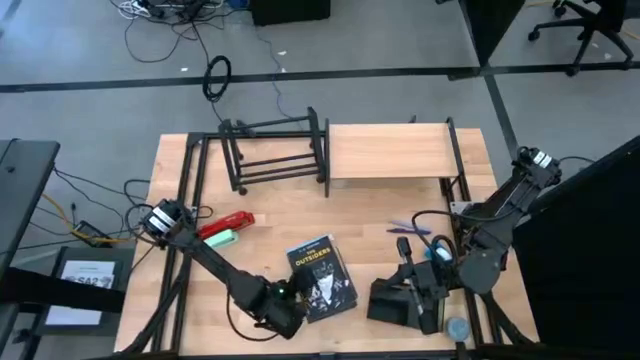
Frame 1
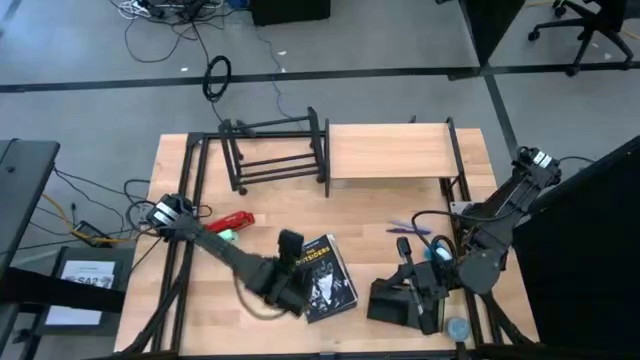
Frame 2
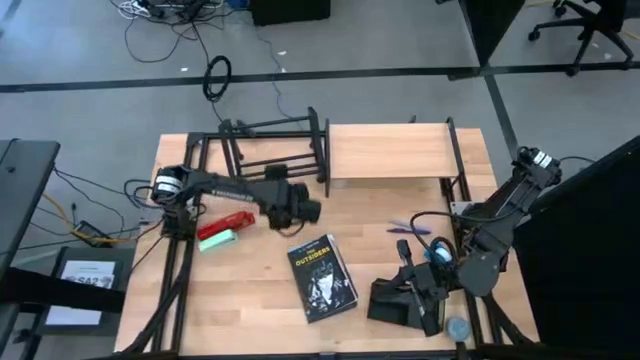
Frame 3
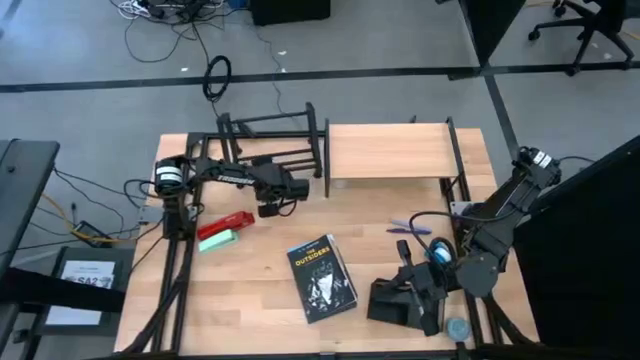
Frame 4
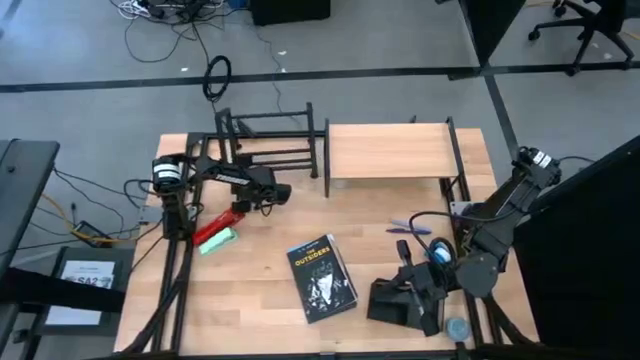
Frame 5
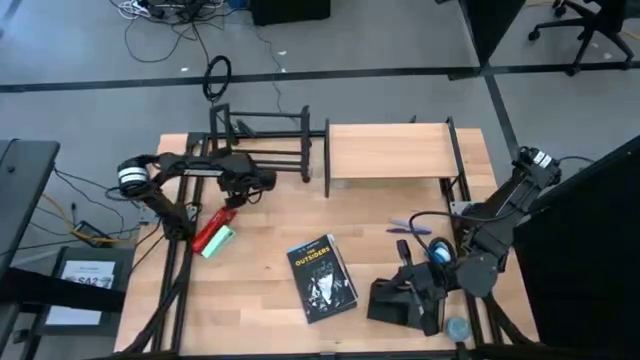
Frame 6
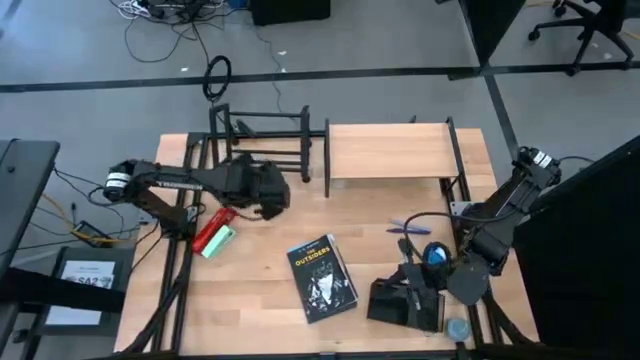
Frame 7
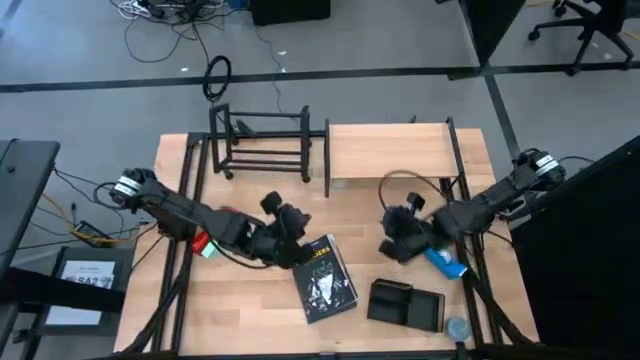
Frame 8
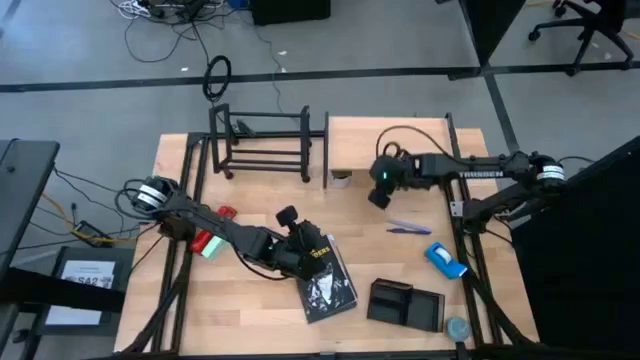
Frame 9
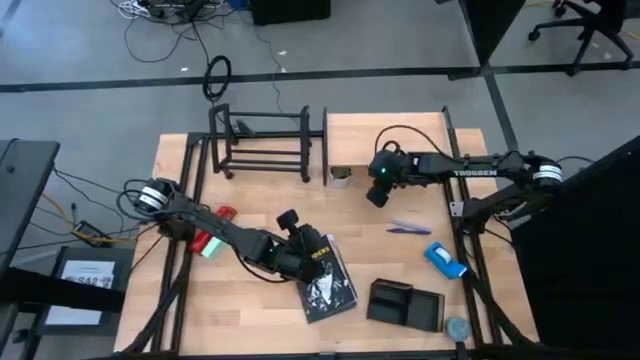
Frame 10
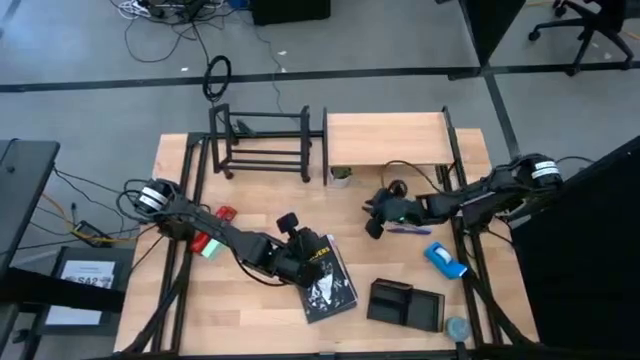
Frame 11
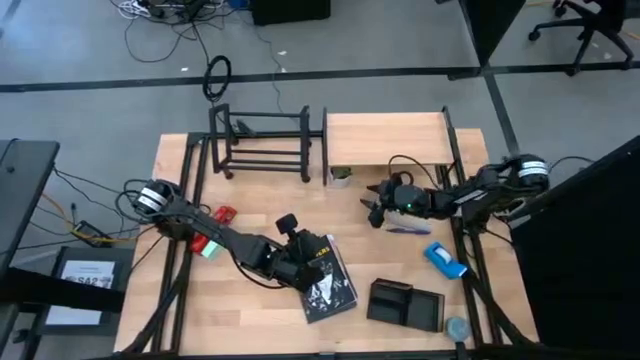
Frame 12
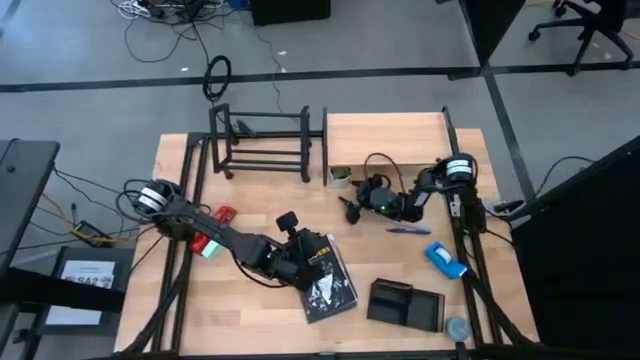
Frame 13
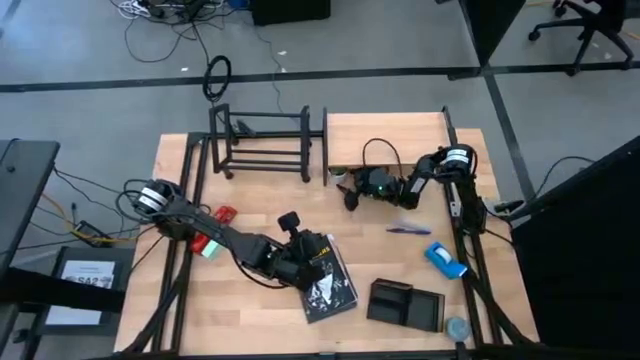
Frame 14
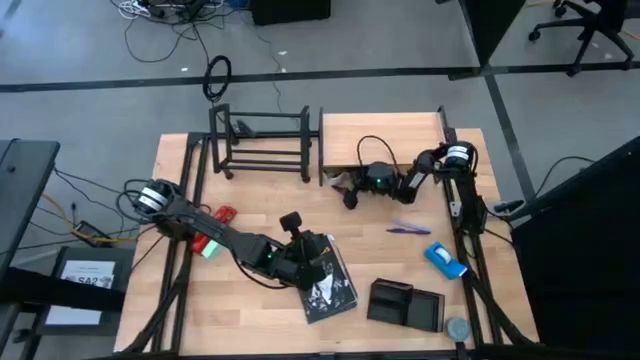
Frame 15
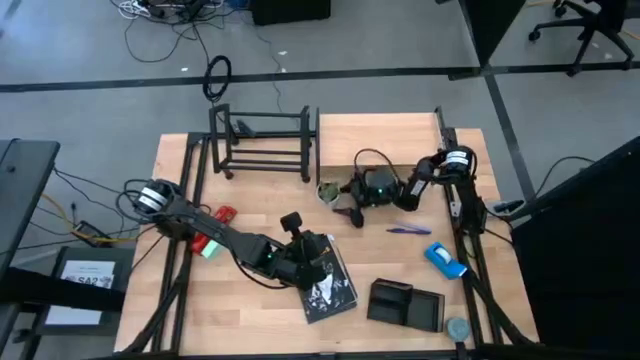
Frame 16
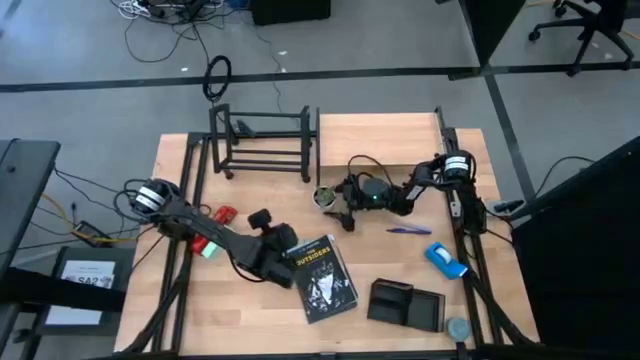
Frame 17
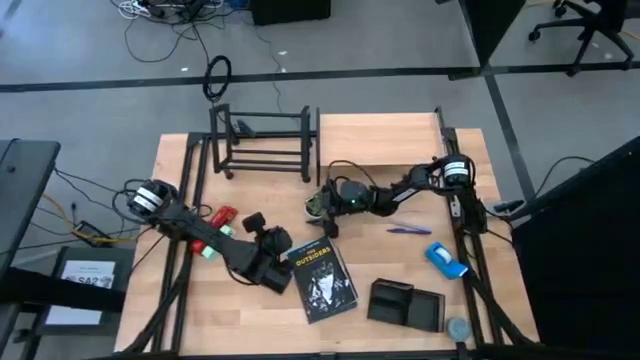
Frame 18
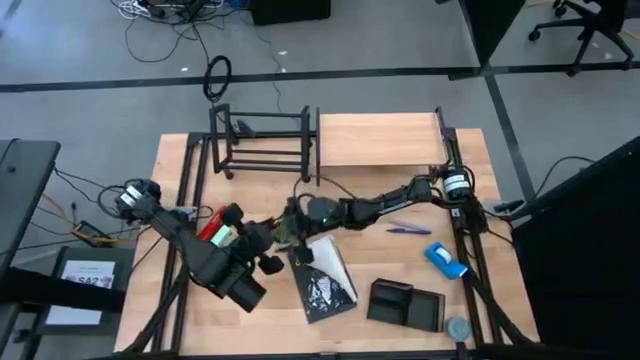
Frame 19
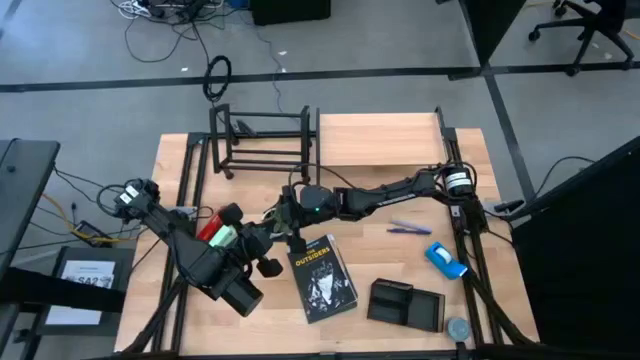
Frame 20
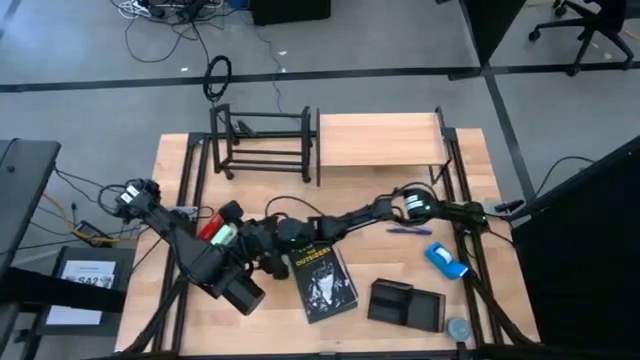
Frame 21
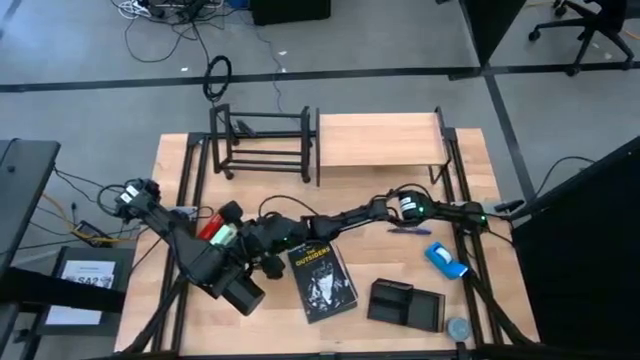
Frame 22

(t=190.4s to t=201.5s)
Task: Stock shelves
Remove the white flower pot from under the shelf

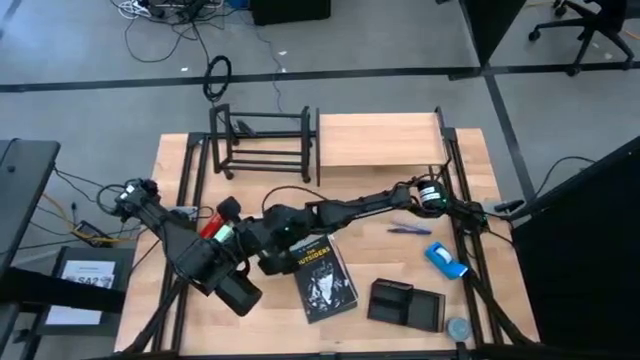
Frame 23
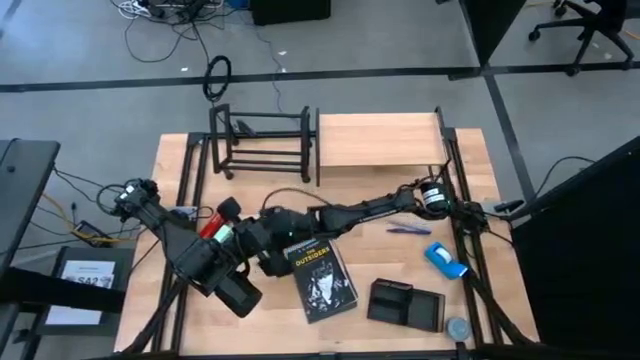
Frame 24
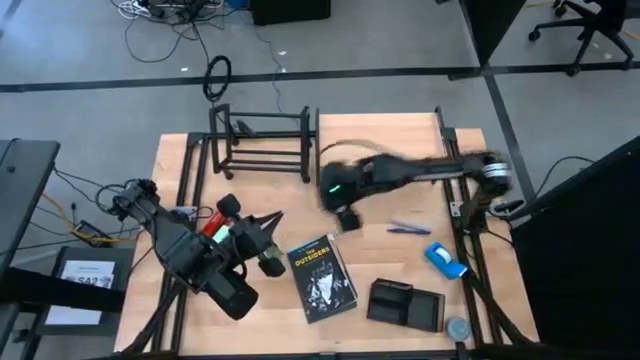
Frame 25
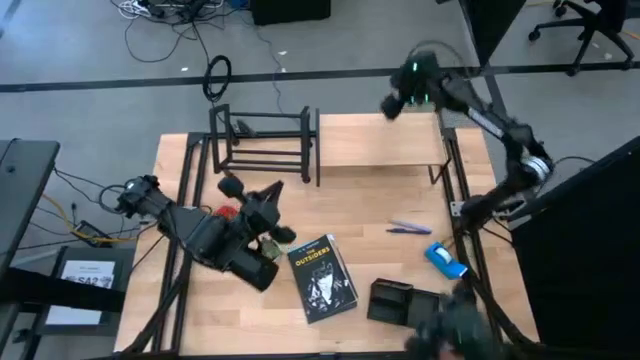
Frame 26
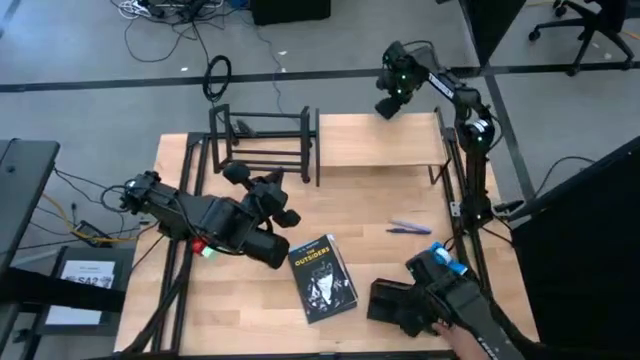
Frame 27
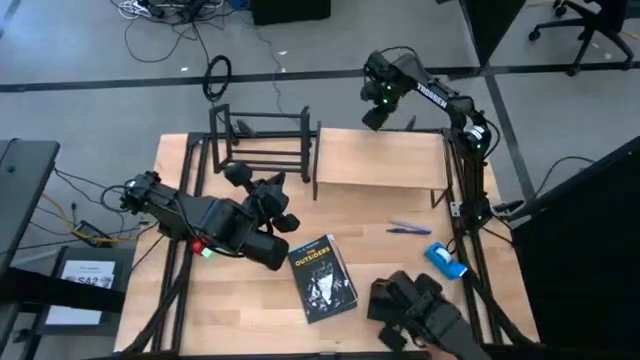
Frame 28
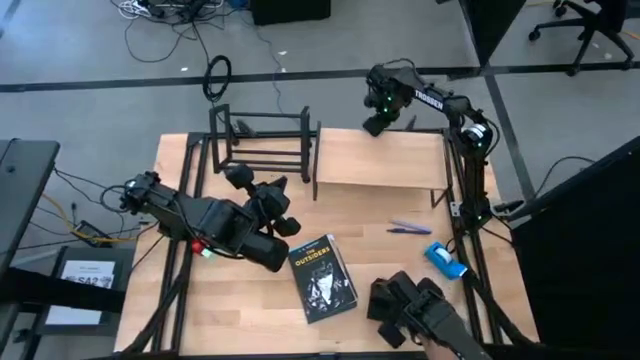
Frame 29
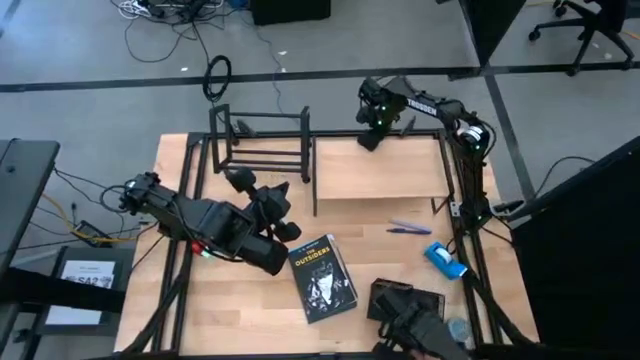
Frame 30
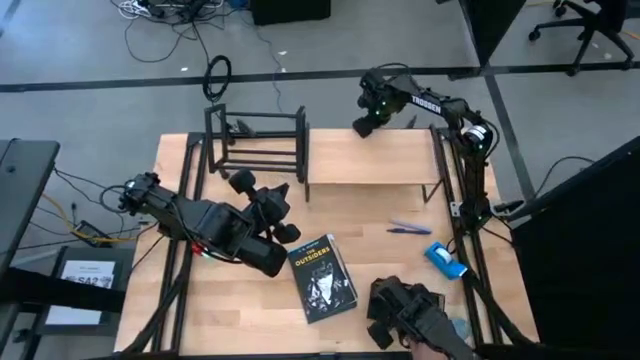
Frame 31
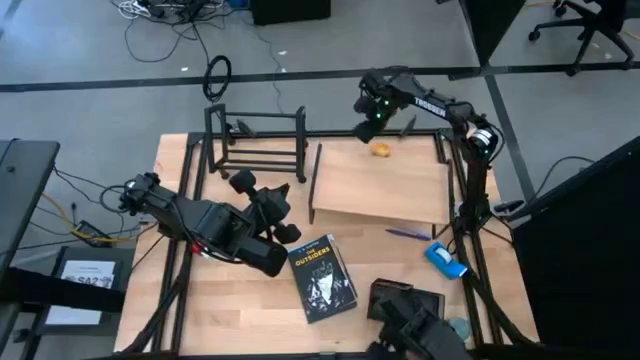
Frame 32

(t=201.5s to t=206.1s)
Move the shelf to the middle right of the table

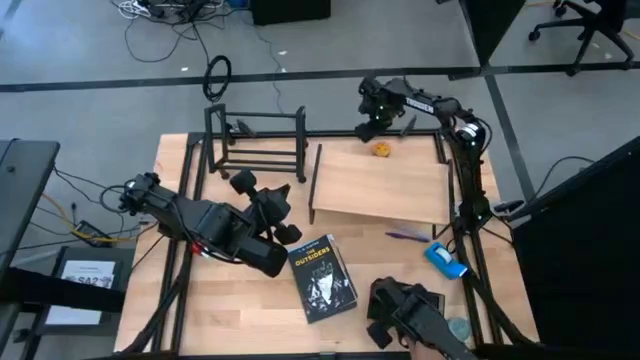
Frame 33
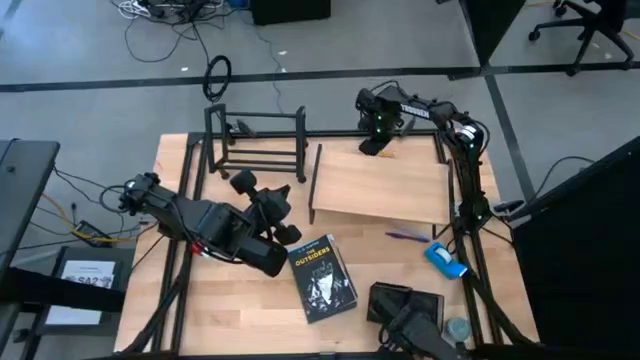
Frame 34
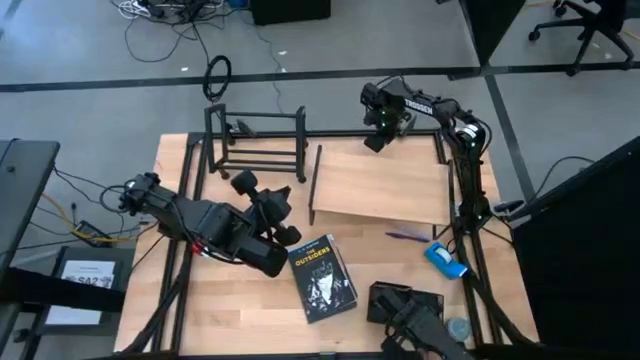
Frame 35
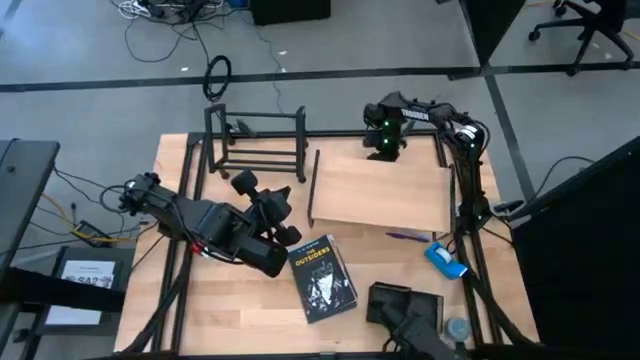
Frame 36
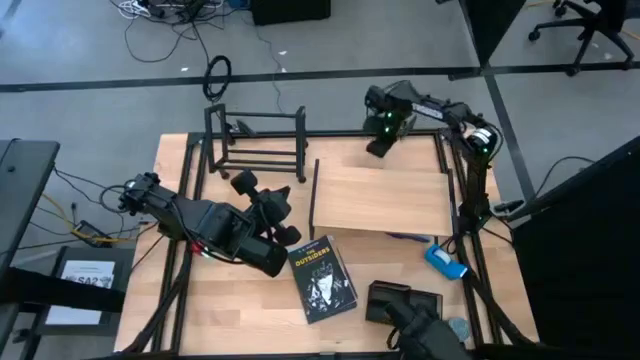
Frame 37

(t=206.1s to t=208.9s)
Remove the yellow scented candle from under the shelf

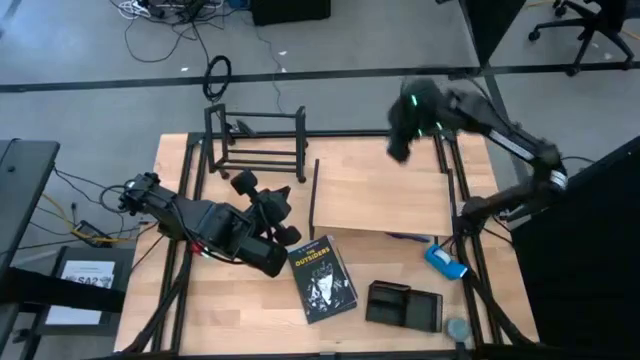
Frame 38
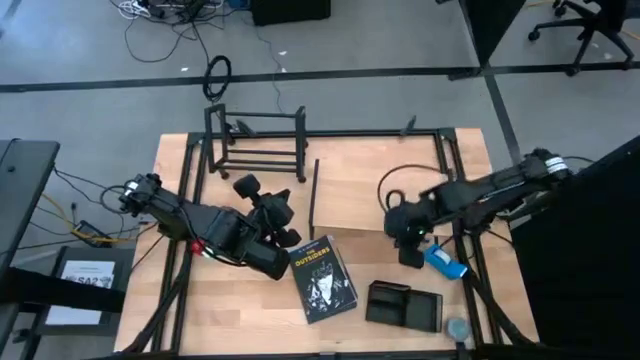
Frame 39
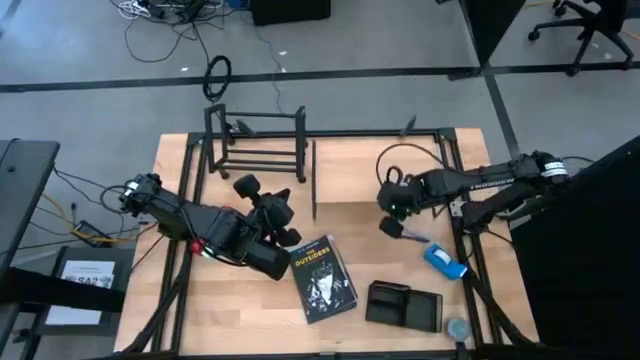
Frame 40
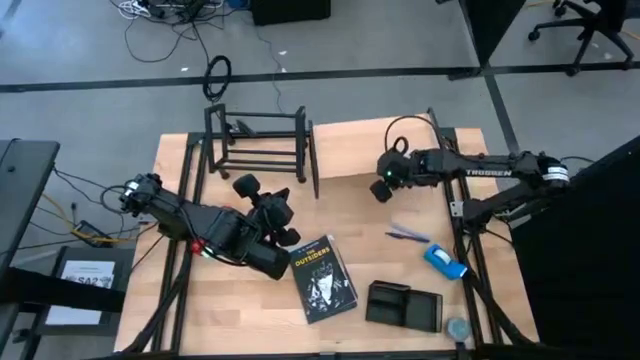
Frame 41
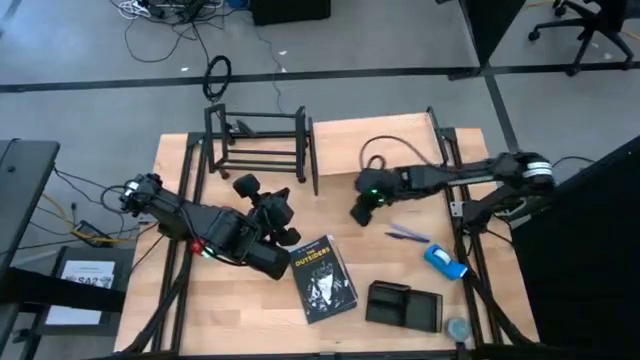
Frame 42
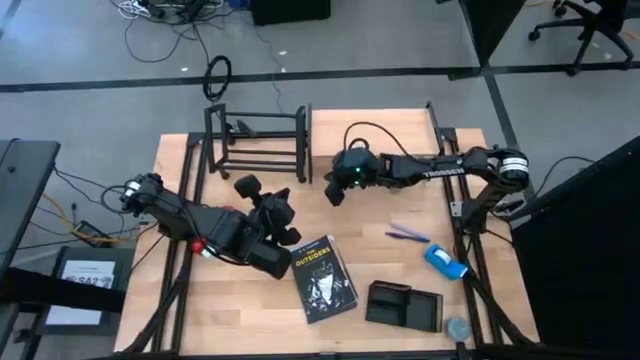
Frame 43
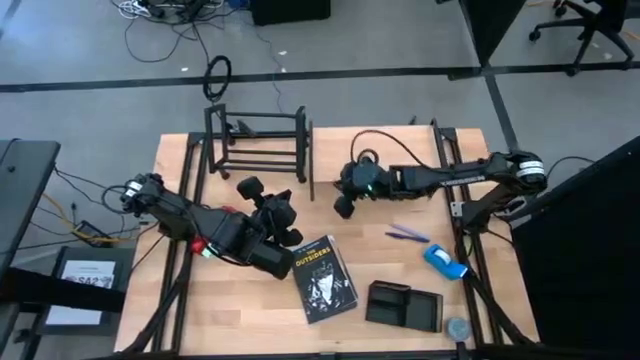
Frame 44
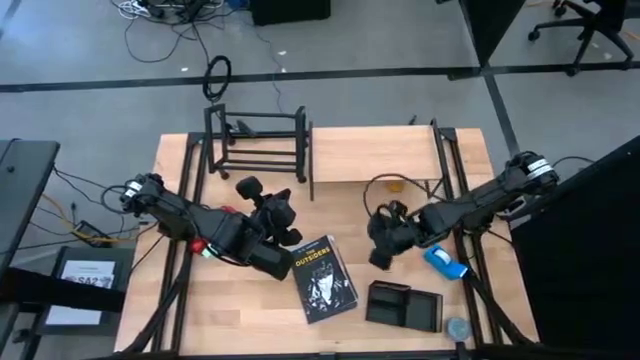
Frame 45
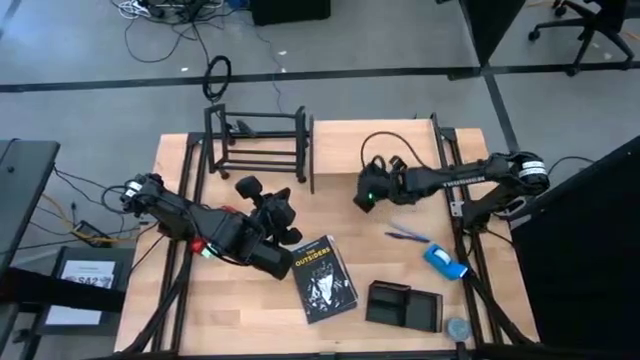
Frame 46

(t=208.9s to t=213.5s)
Move the shelf to the top right of the table
